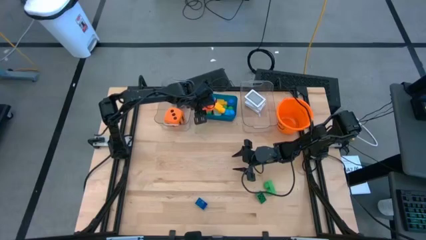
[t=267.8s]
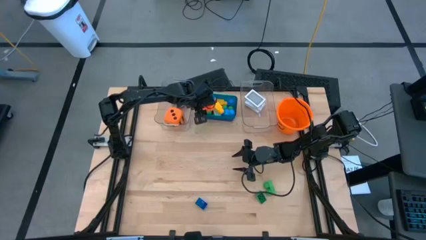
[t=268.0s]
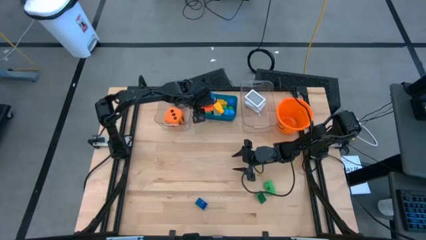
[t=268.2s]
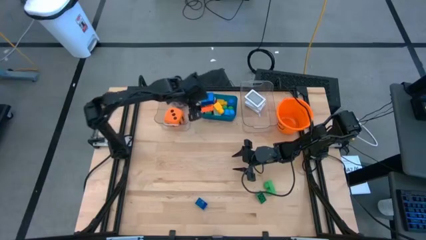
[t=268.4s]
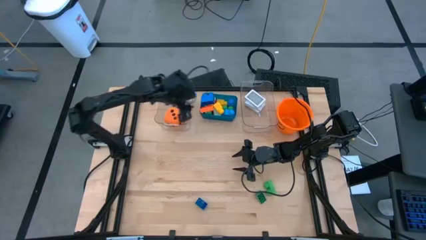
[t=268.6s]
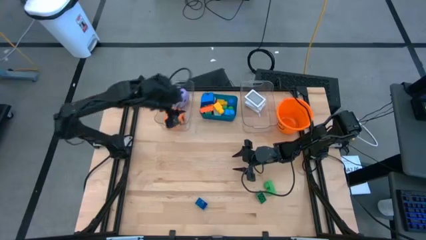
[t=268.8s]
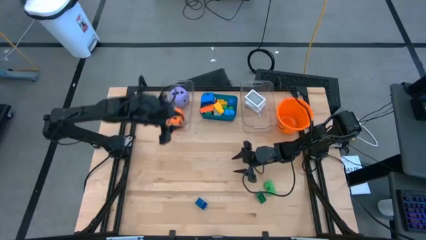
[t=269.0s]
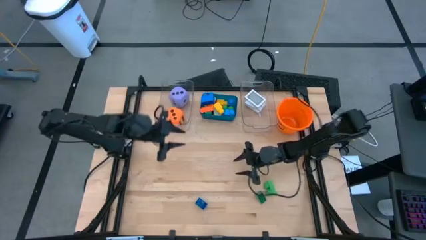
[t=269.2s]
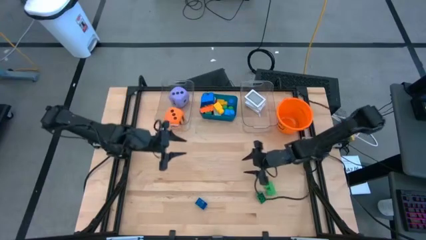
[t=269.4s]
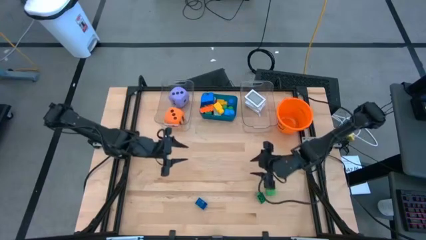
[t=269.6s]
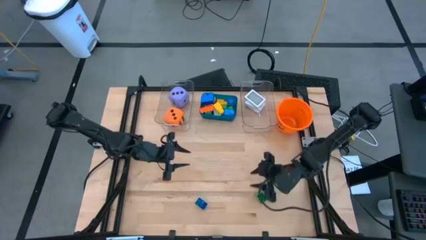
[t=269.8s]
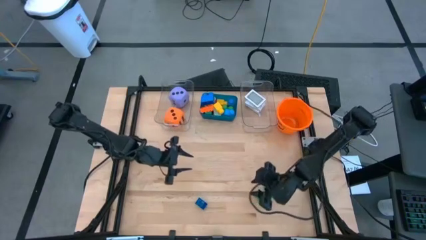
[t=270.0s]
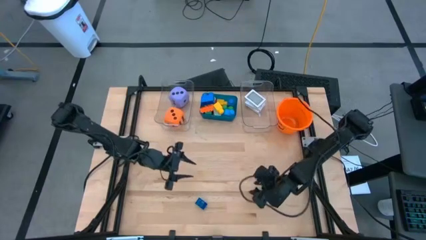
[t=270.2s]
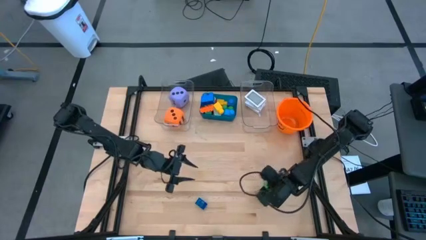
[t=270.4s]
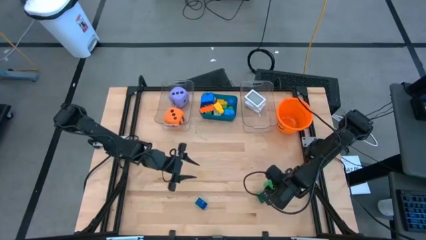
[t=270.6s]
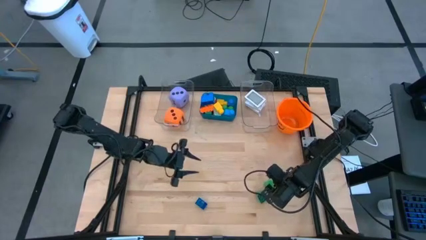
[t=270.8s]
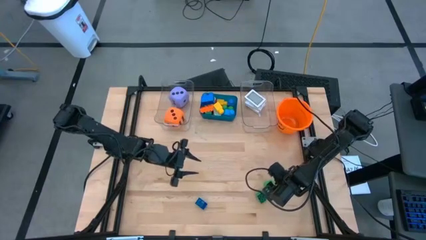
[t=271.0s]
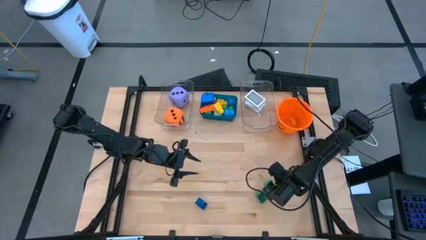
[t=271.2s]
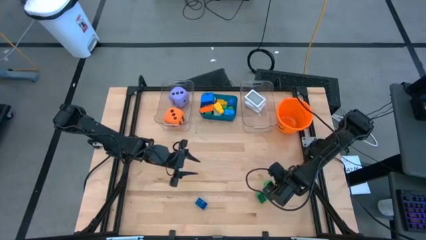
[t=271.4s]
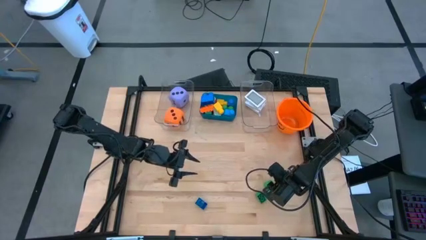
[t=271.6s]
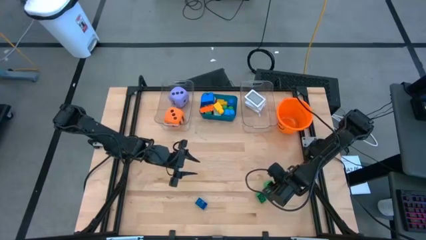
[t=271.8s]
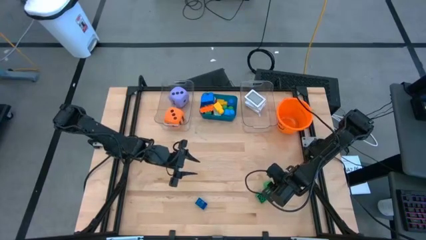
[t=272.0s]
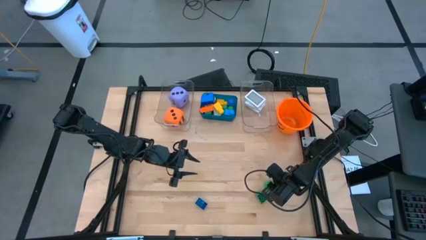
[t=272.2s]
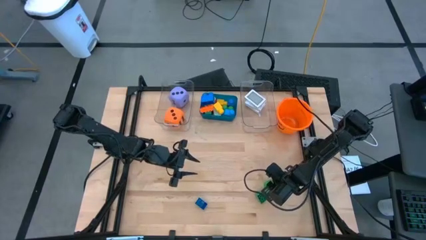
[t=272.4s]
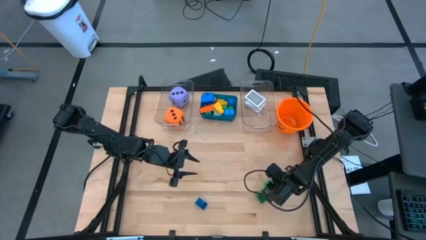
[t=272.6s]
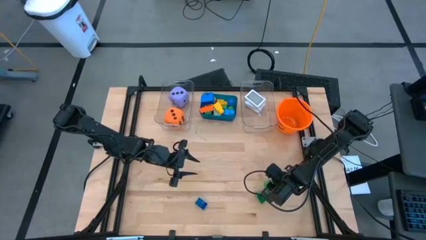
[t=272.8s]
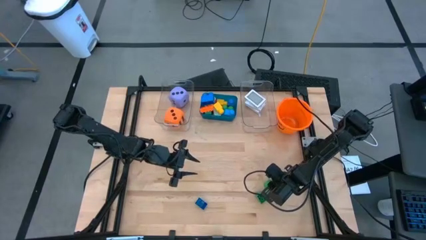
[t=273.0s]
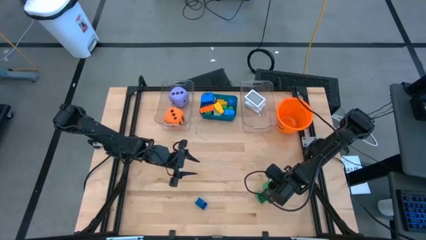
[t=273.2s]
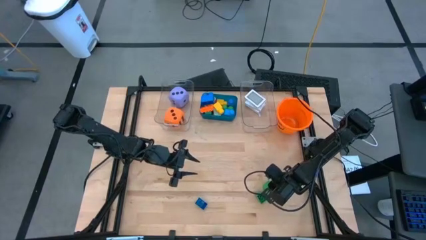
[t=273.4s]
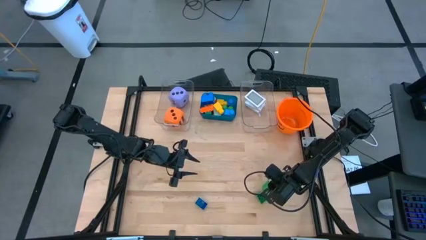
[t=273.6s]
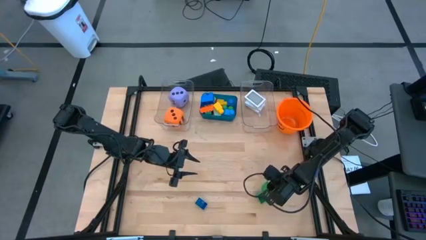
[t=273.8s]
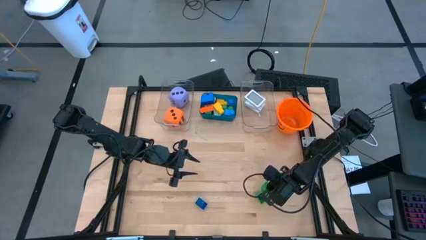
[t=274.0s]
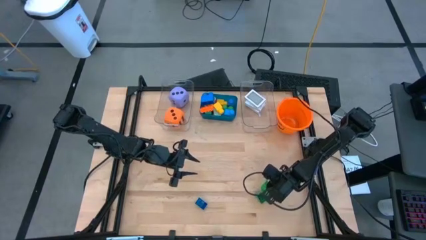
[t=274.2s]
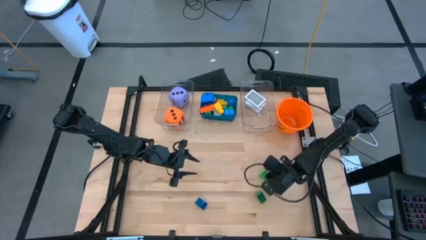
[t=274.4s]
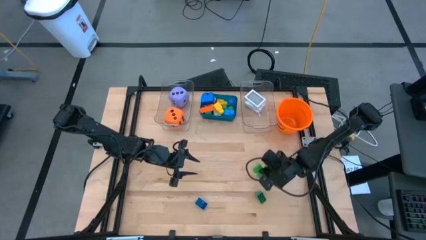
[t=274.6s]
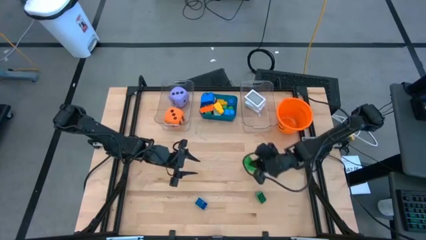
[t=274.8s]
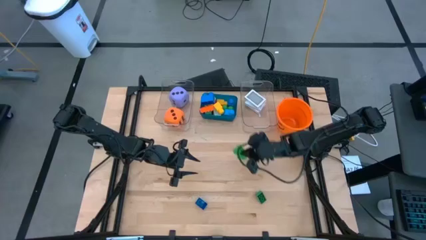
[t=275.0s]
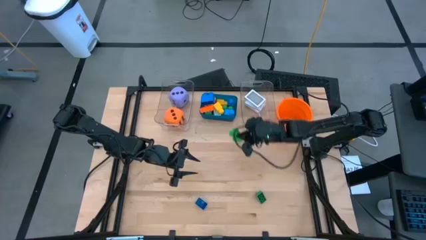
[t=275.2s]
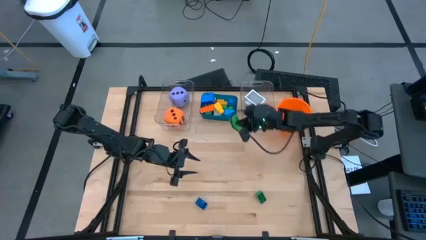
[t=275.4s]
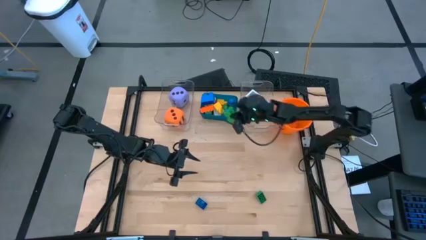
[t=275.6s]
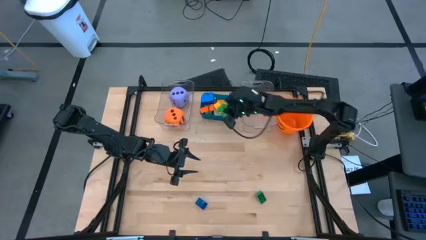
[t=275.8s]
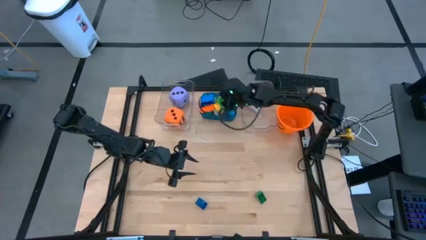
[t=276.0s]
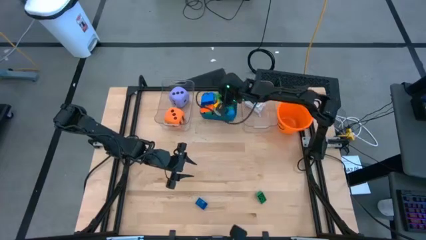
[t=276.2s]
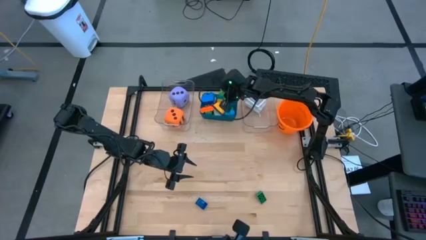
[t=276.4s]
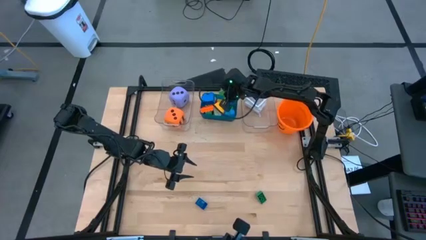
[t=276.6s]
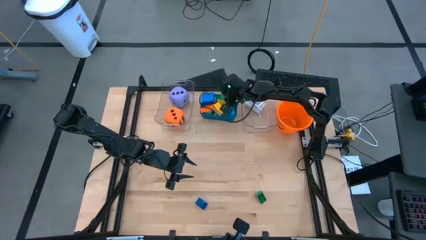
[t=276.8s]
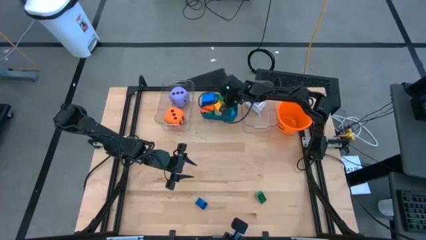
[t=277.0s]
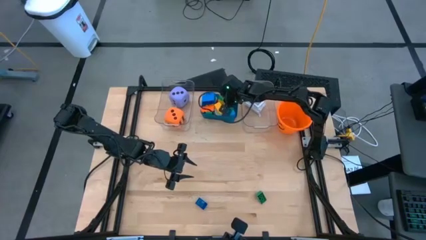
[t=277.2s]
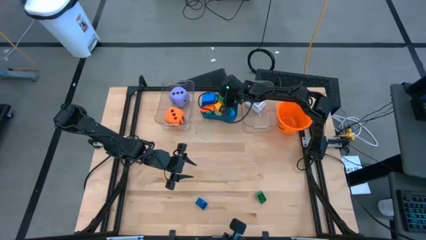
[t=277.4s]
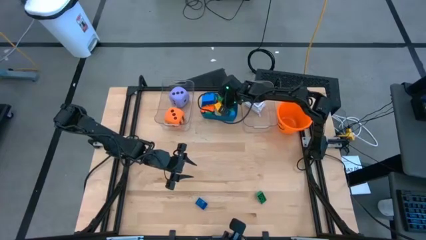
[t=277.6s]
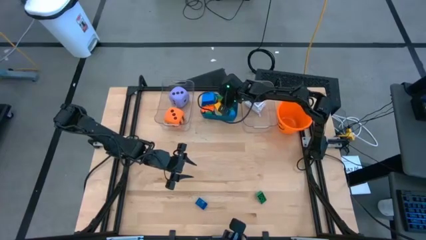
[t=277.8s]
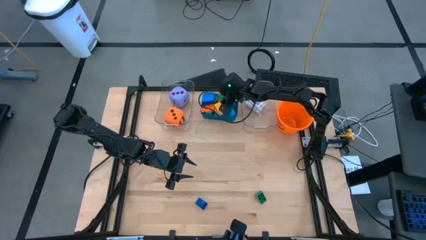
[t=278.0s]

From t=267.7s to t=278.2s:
Task: Pick & Place Toys
Put the green game piece into the blue bin

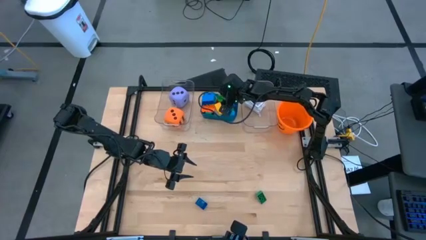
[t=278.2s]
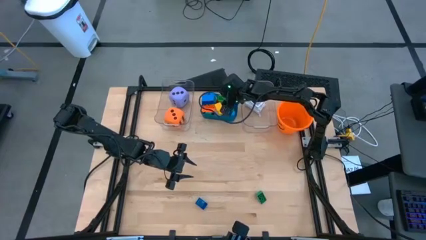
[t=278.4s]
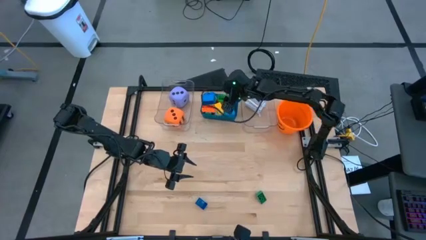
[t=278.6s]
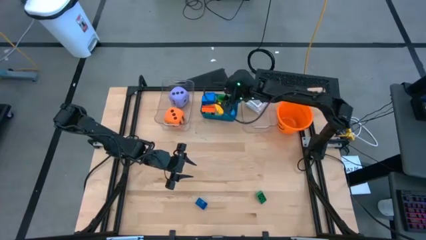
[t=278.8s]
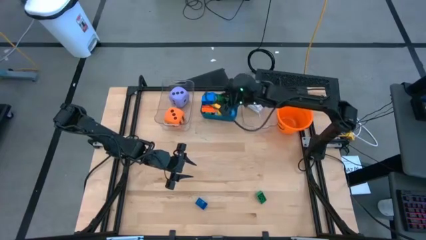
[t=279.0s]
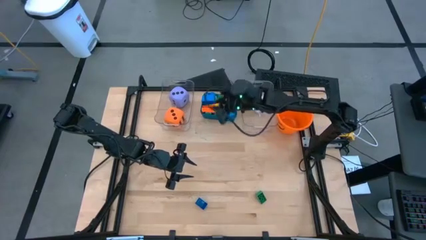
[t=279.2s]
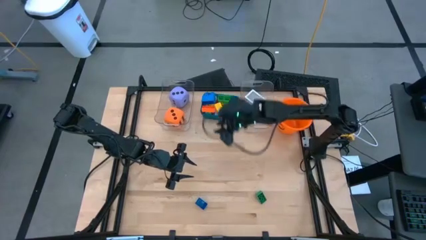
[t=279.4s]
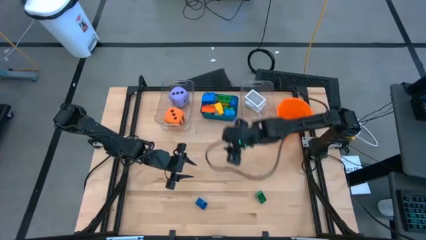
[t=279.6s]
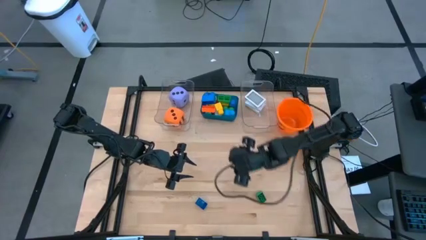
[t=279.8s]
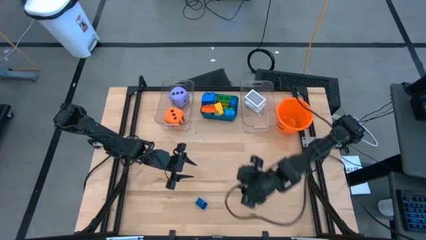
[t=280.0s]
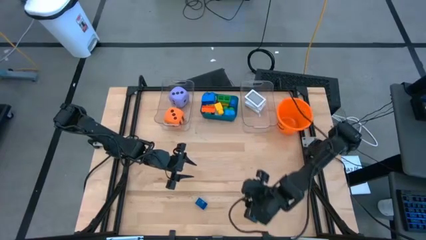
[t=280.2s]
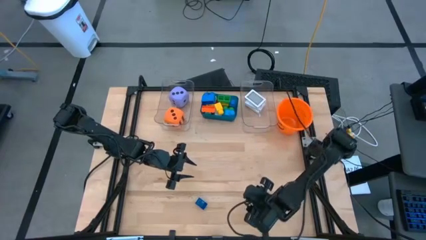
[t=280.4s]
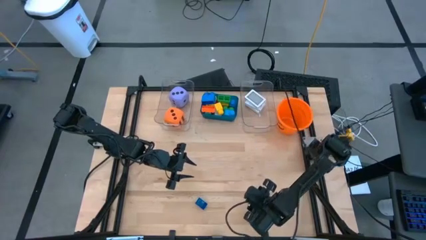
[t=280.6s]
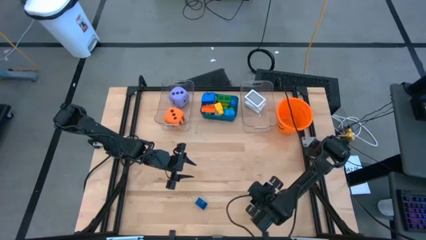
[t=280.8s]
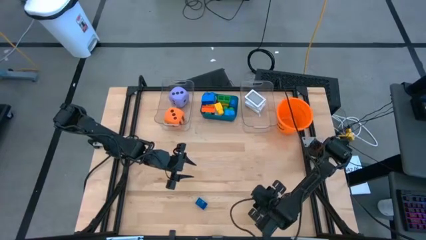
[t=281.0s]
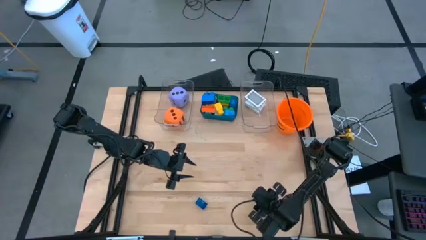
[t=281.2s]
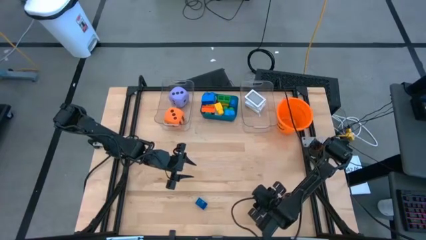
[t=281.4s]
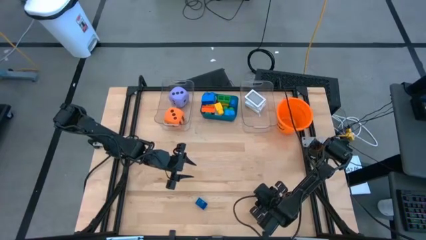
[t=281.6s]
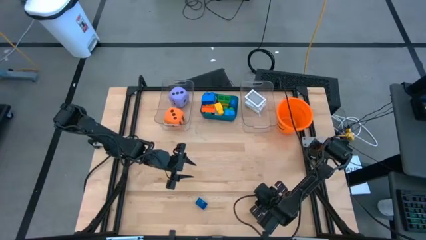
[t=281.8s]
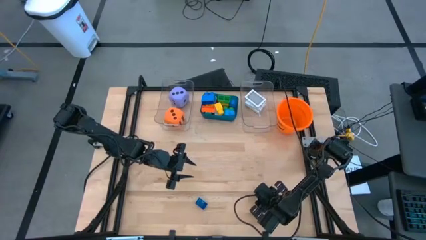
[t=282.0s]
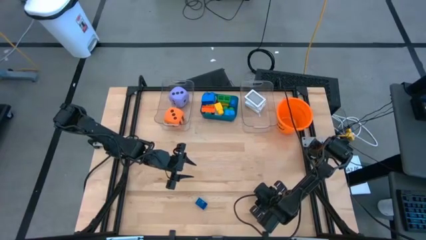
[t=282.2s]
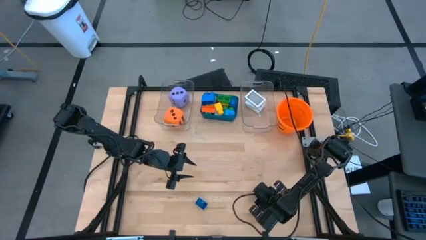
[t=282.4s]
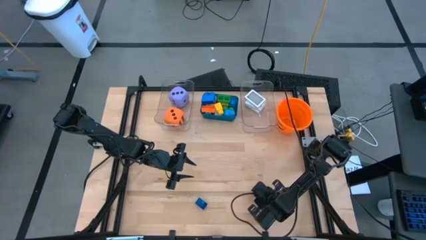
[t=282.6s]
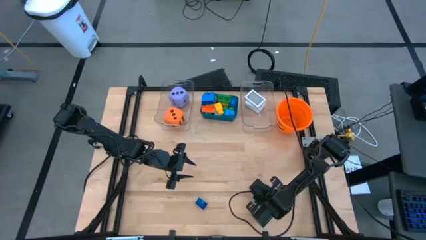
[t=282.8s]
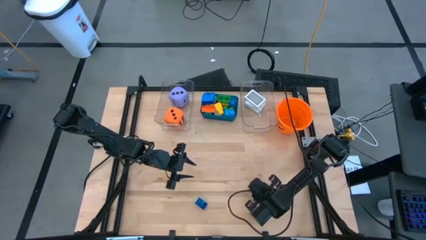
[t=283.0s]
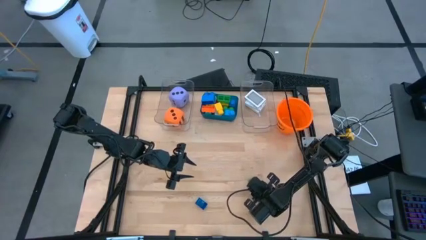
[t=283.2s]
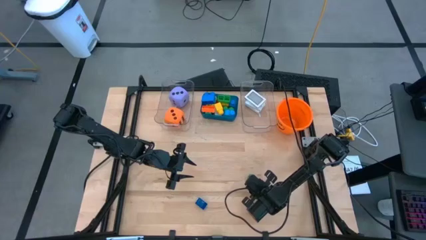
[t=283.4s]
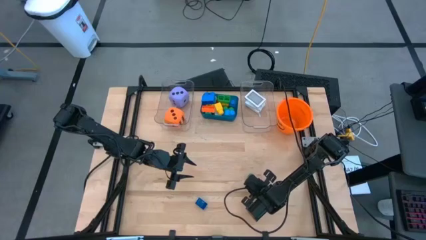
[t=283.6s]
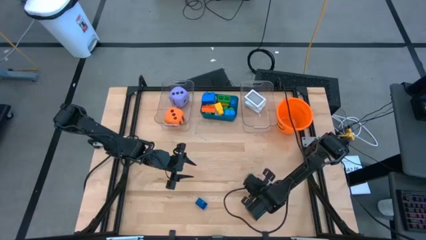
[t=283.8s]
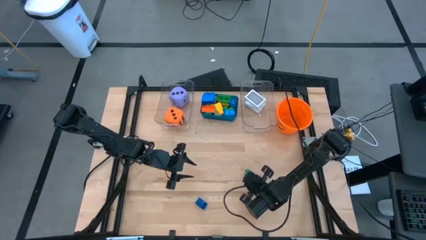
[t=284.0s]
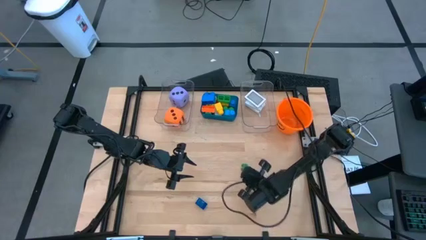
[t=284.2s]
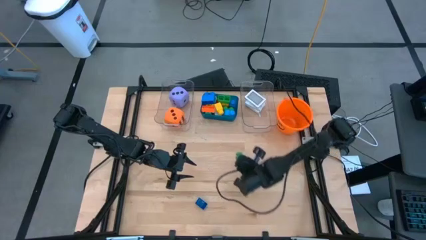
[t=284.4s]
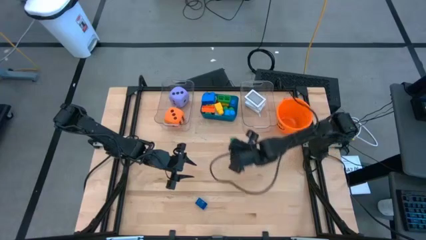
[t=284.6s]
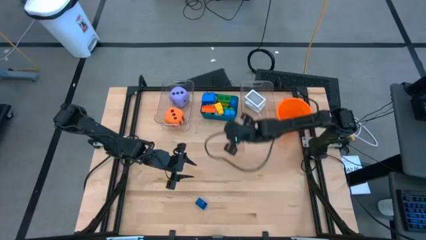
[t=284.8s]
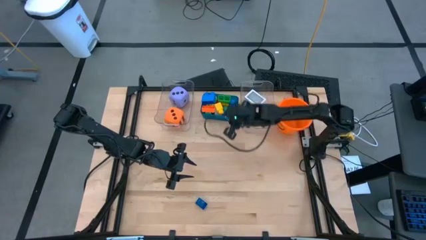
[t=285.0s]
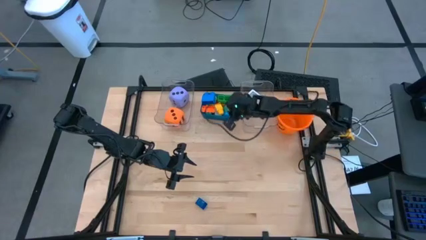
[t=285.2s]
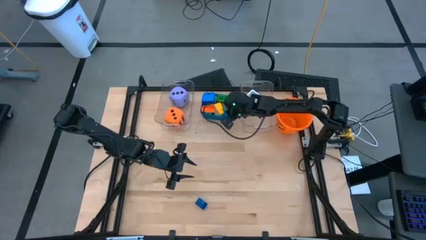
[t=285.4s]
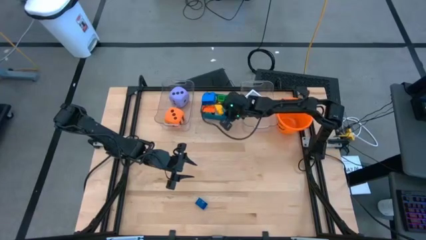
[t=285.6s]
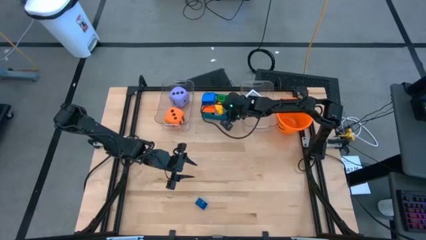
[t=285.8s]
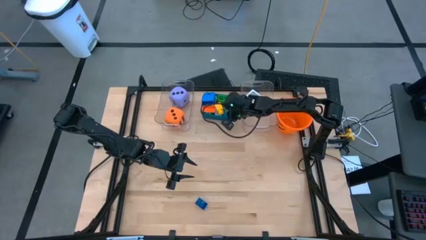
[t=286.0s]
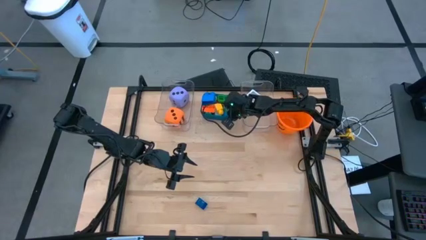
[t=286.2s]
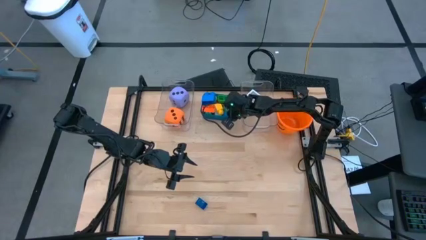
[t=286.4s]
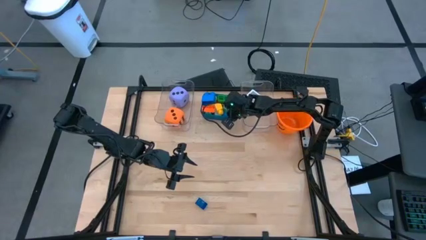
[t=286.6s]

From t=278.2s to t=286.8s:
Put the green game piece into the blue bin
